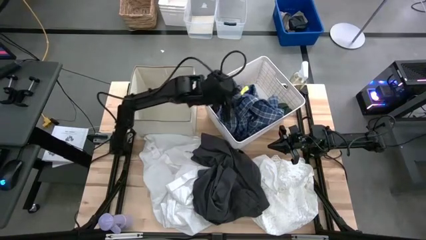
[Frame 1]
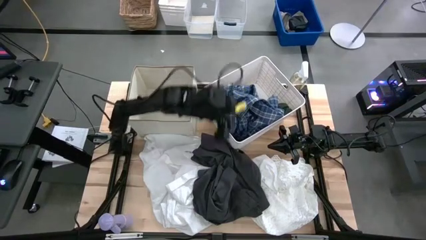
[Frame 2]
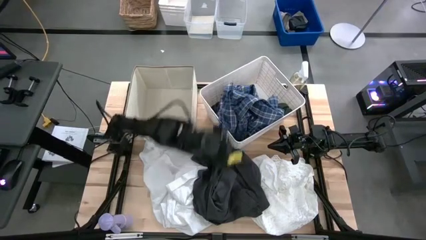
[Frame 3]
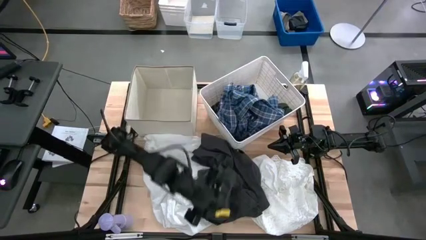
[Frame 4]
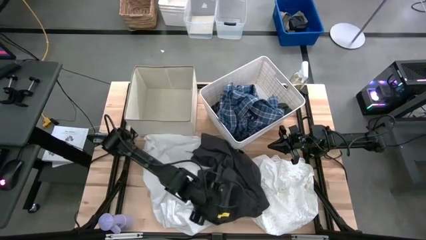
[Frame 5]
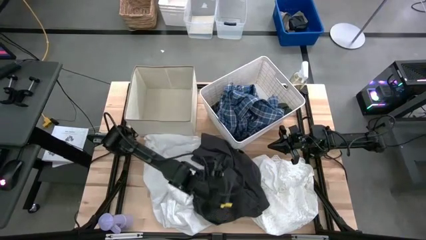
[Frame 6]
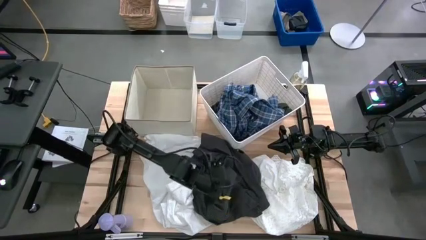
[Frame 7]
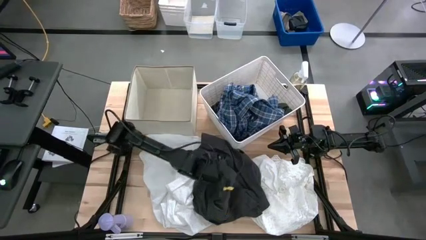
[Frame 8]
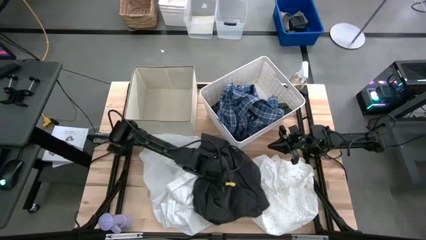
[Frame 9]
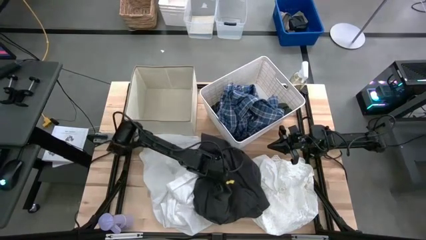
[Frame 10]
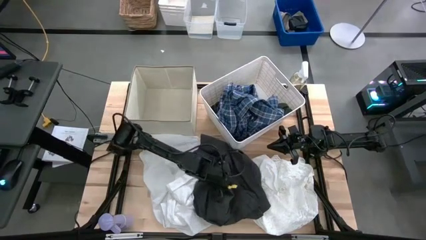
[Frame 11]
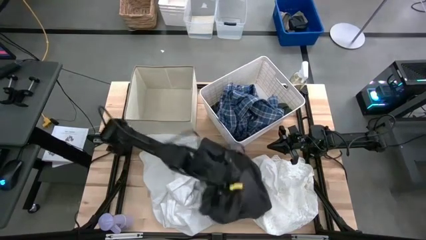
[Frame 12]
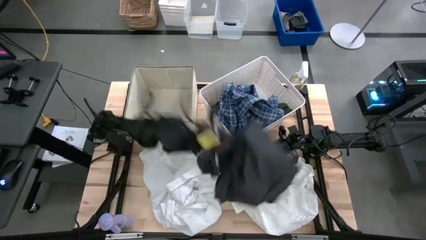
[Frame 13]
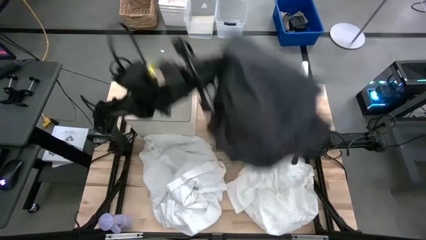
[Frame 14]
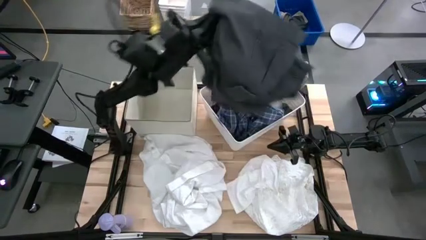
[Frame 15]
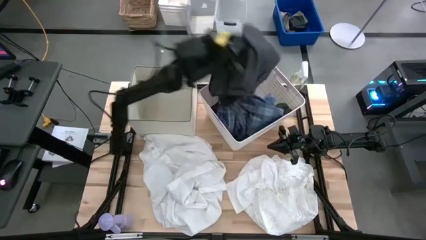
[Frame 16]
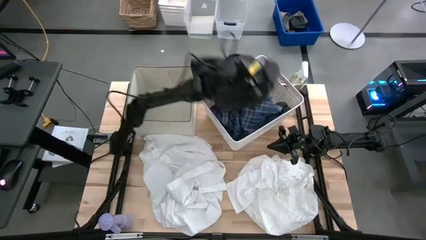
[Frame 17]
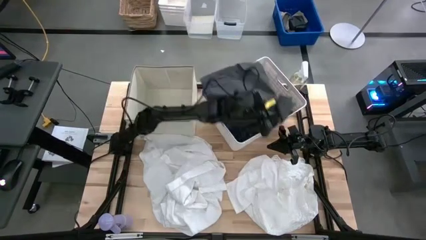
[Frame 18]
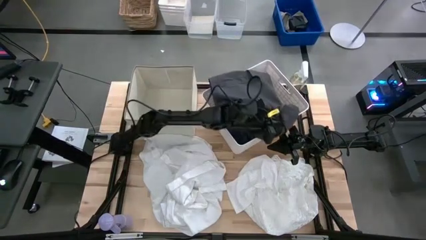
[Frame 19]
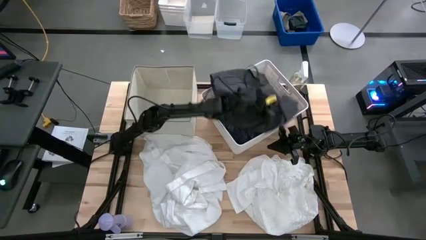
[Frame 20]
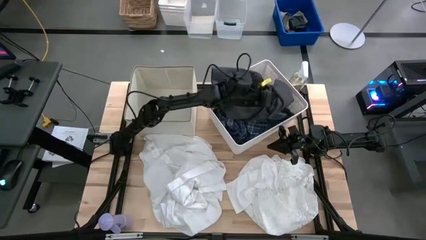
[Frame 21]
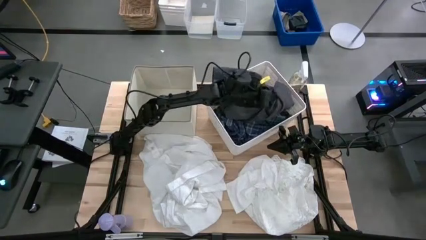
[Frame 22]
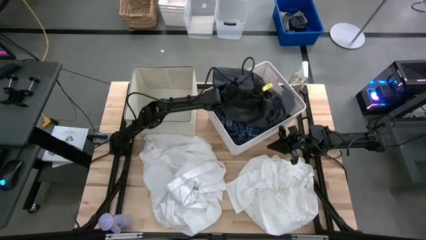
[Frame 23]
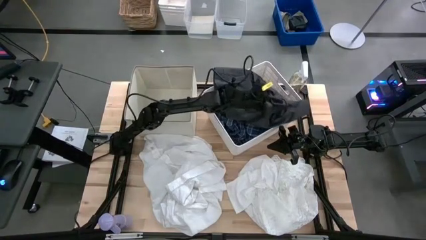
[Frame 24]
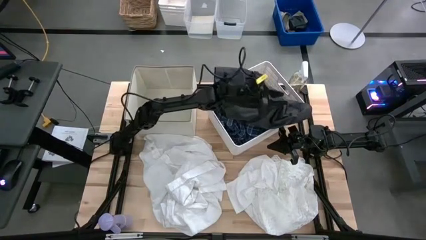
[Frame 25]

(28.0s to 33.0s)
Task: Sort clothes
Put the black shorts into the white bin

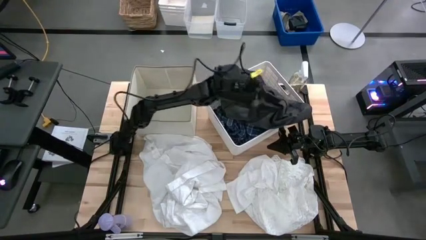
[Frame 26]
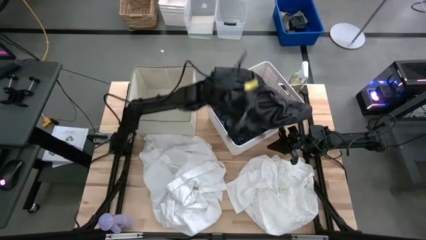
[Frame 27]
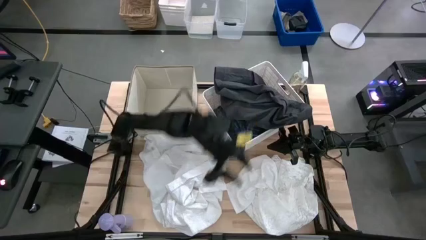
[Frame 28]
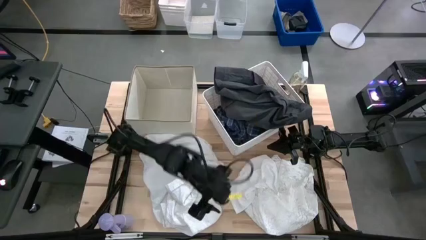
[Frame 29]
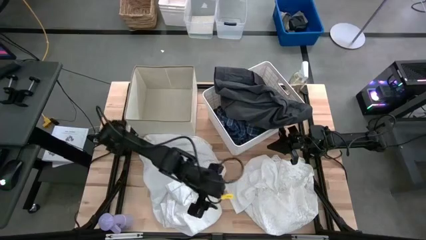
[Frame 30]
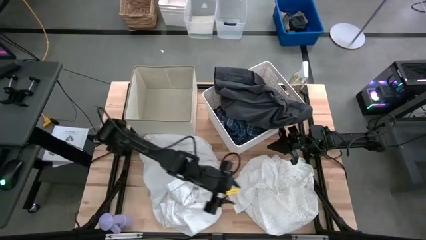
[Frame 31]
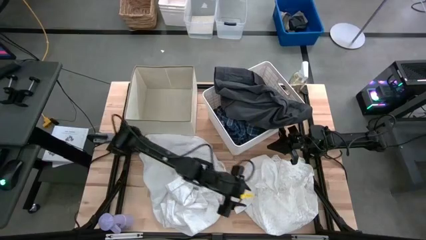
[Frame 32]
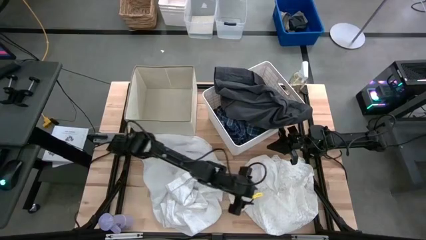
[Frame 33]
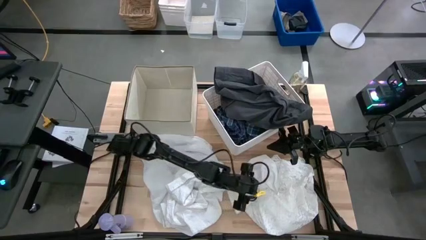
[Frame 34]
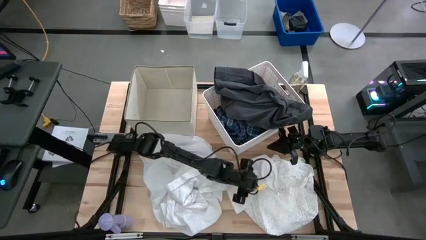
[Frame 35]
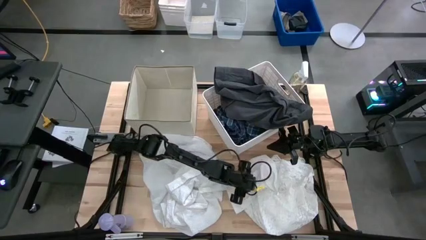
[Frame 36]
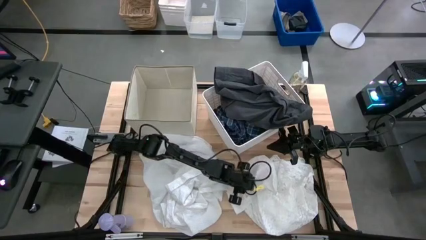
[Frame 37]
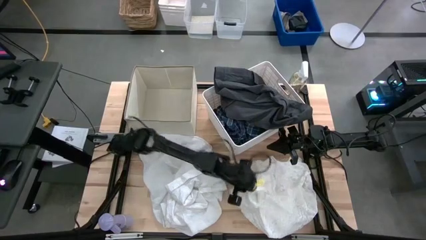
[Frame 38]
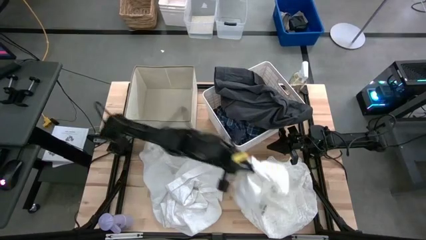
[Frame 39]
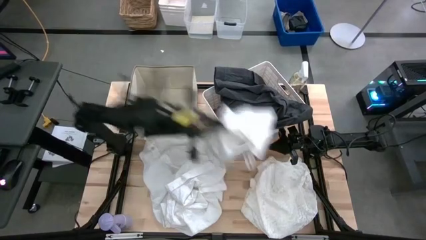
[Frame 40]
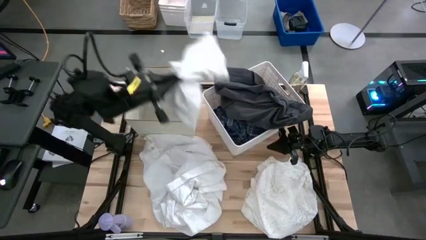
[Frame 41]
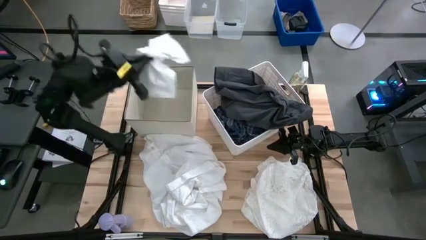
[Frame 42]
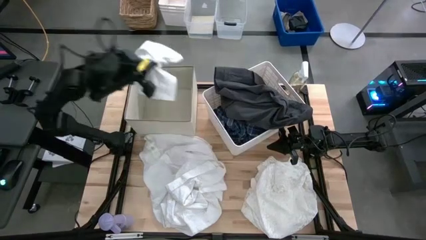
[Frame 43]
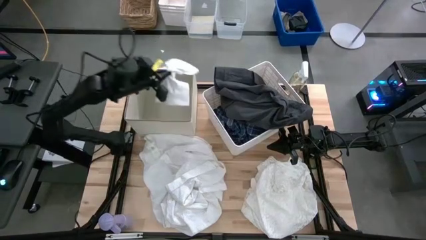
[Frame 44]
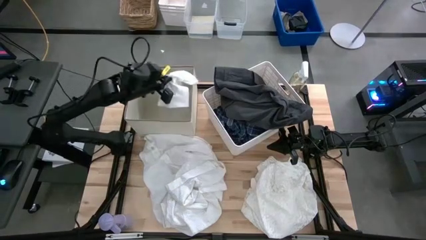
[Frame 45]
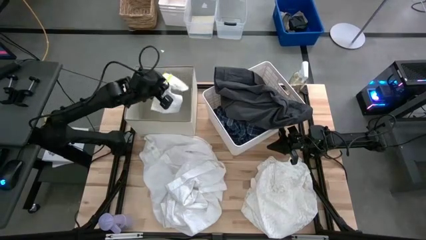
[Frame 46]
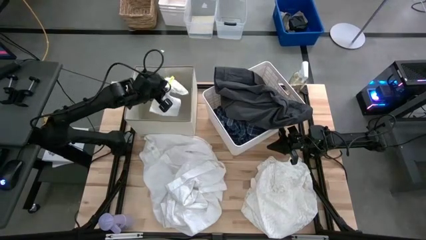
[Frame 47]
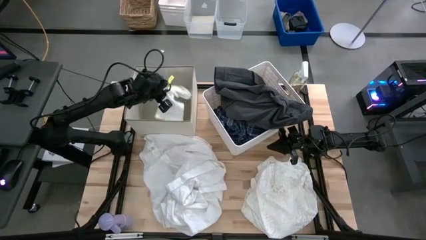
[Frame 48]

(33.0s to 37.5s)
Put the white shorts into the gray laundry organizer

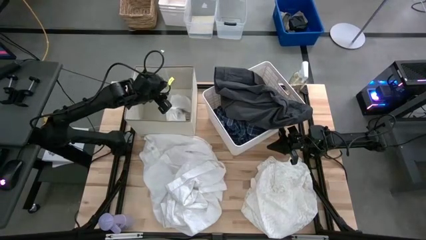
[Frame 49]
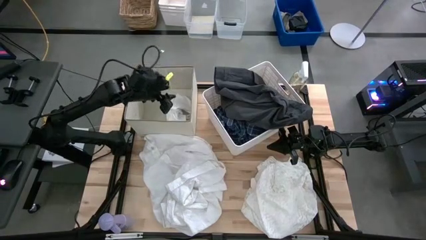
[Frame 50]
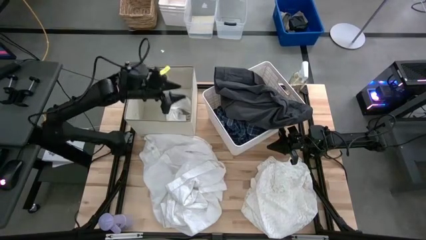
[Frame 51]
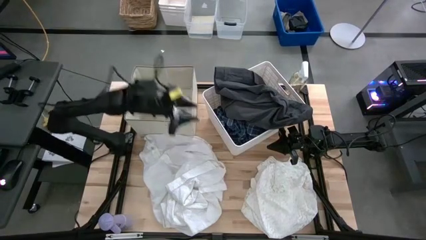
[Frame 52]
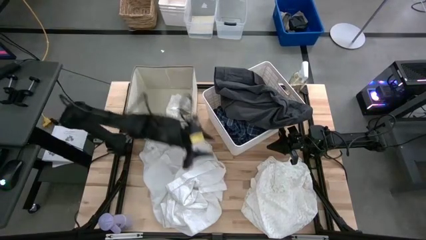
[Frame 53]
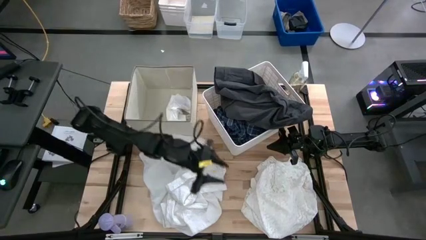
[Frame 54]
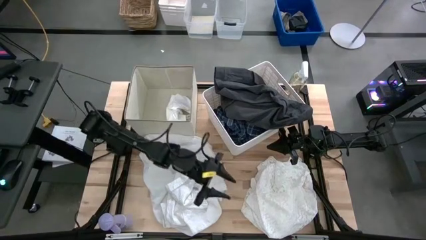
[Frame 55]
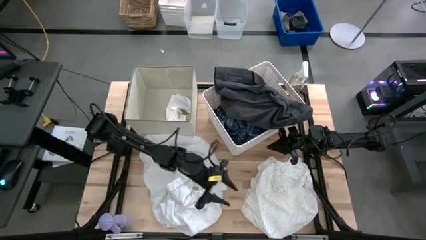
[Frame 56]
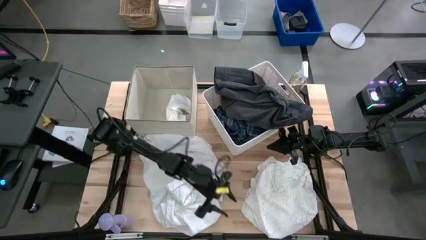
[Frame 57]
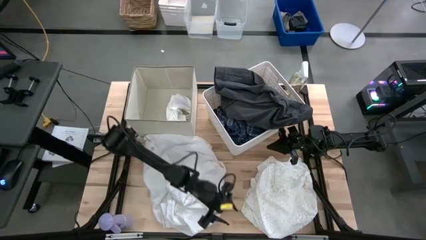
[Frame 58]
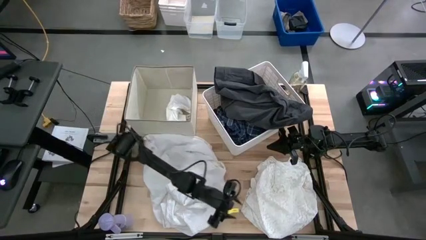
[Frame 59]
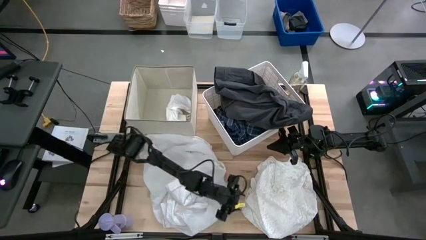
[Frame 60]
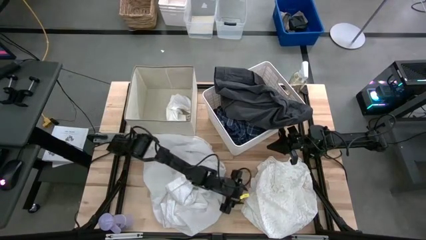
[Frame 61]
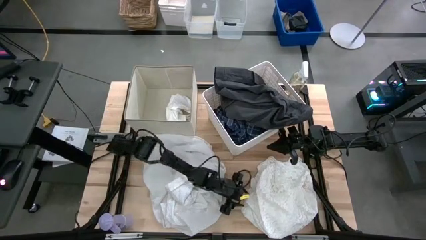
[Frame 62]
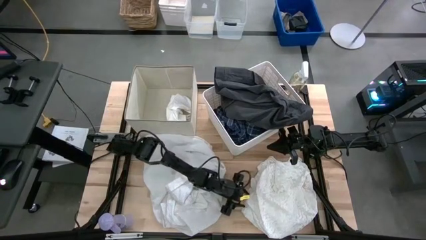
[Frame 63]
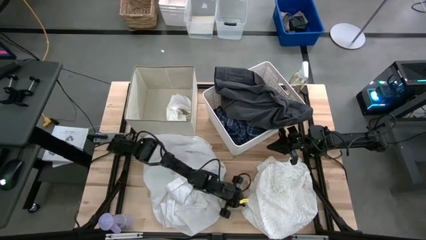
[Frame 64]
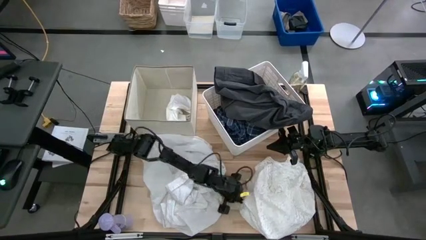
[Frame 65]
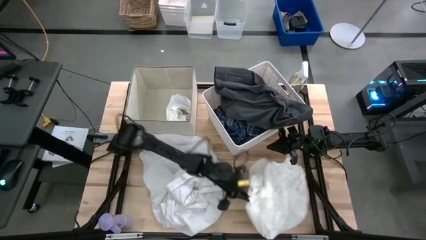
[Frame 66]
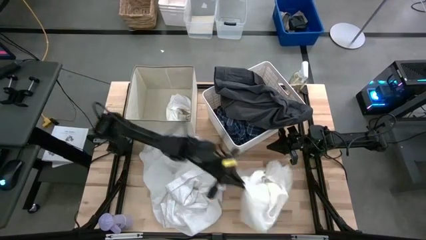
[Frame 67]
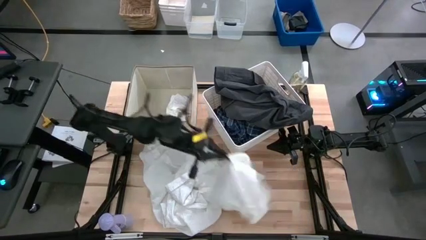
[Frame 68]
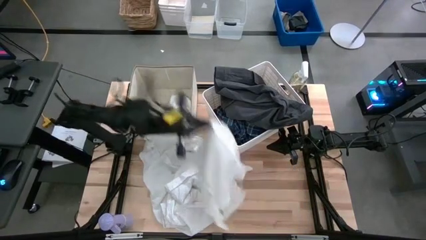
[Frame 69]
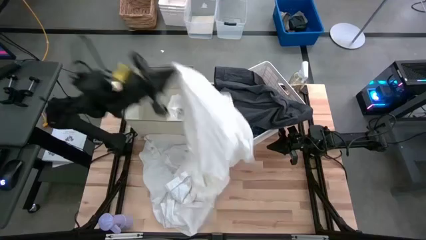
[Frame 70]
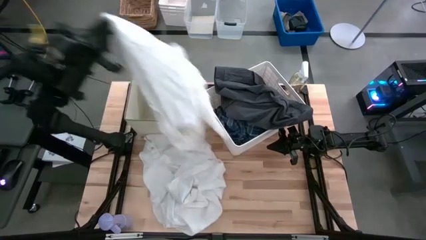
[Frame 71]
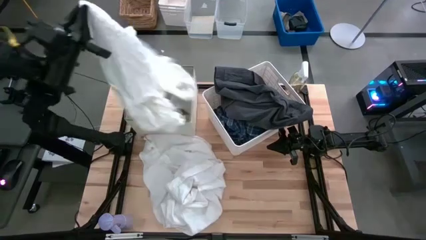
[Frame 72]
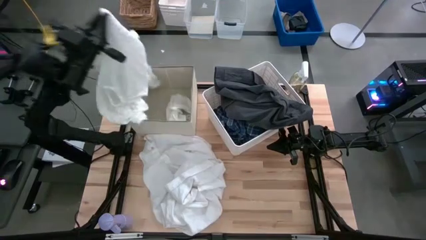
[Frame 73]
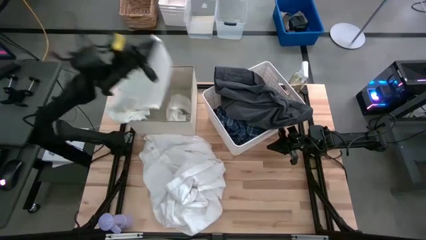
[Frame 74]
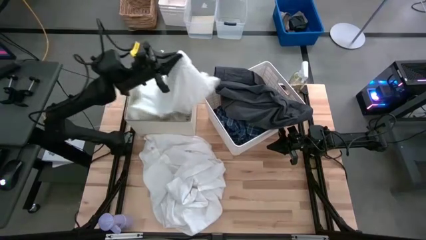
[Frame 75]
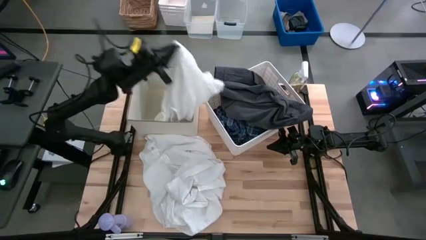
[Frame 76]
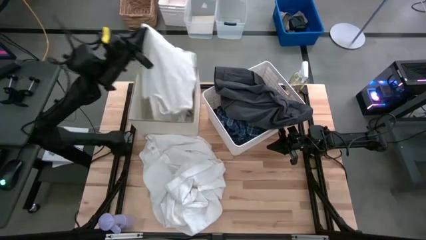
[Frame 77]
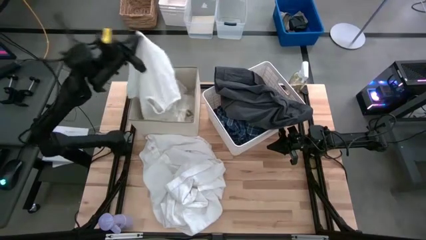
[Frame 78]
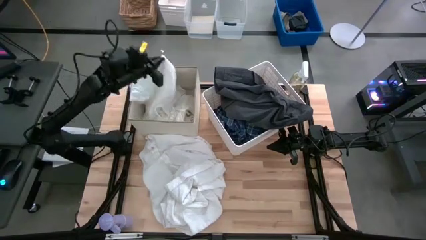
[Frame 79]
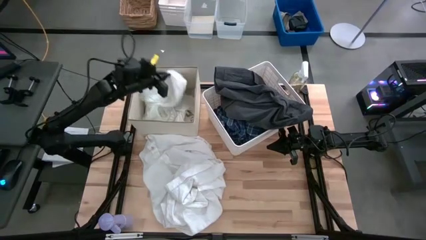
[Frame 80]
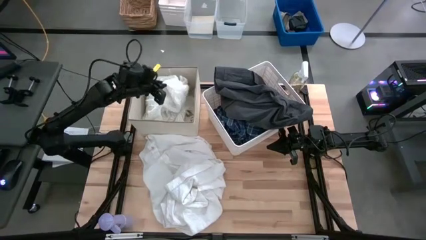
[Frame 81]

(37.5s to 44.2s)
Put the right white shirt into the gray laundry organizer
